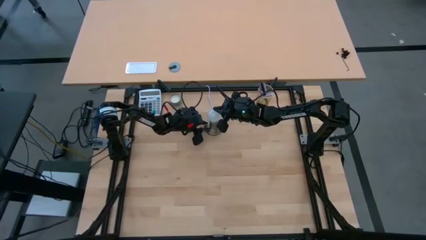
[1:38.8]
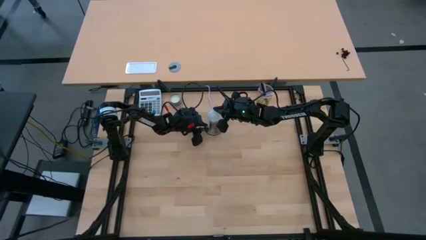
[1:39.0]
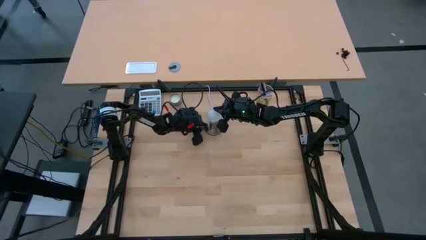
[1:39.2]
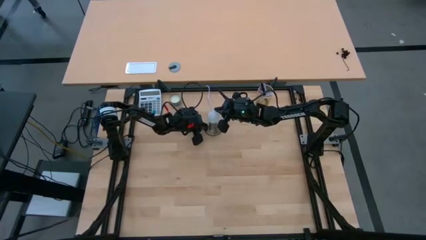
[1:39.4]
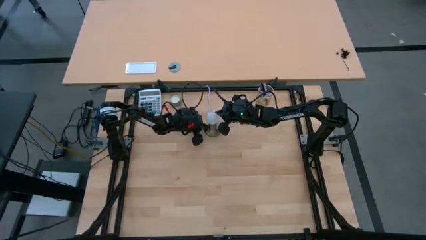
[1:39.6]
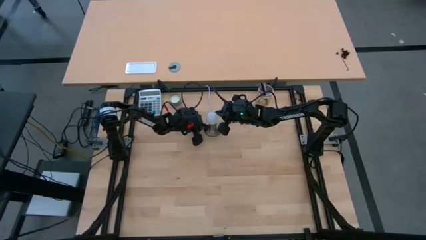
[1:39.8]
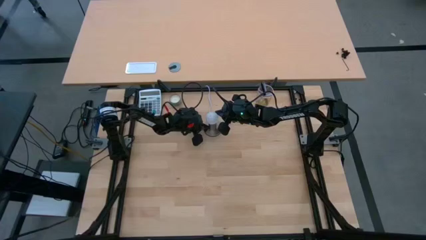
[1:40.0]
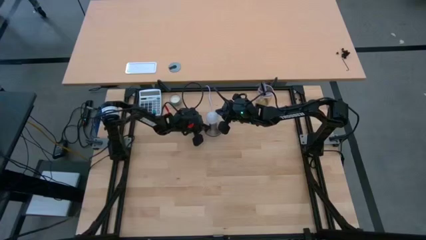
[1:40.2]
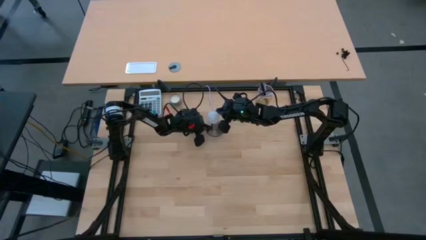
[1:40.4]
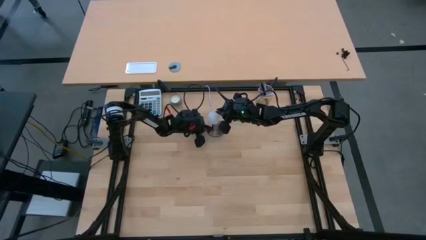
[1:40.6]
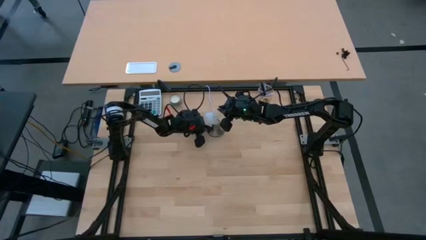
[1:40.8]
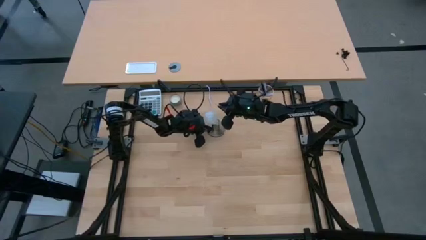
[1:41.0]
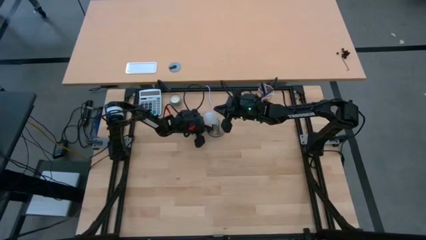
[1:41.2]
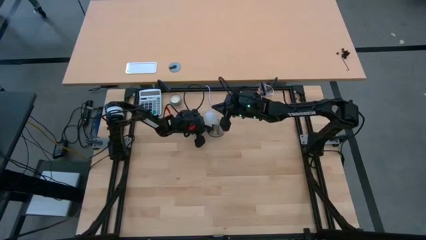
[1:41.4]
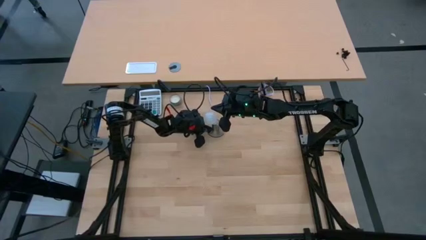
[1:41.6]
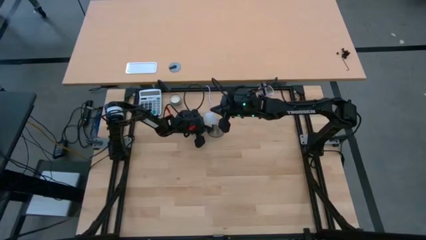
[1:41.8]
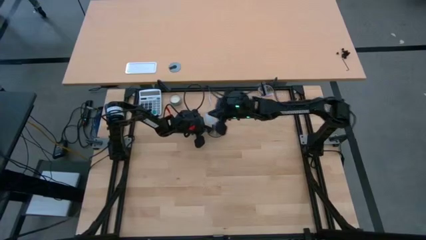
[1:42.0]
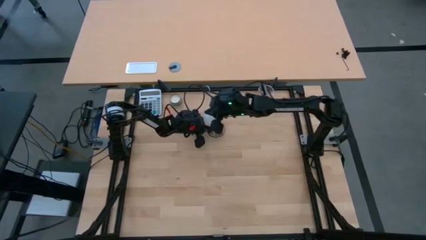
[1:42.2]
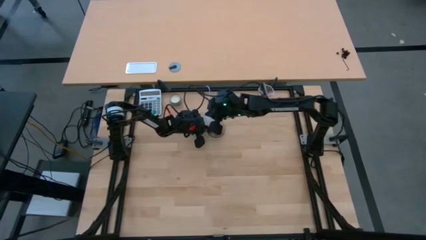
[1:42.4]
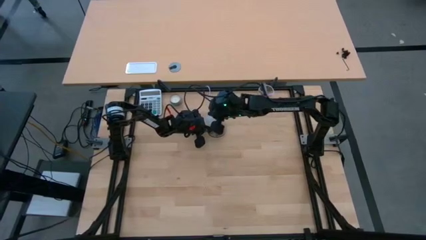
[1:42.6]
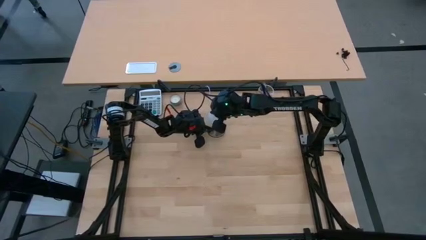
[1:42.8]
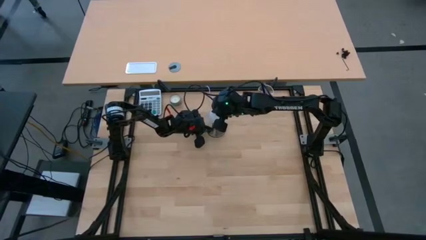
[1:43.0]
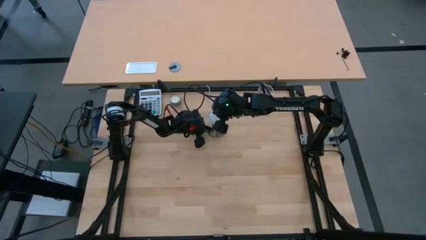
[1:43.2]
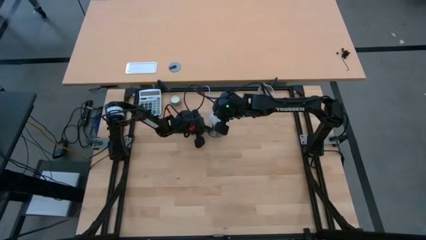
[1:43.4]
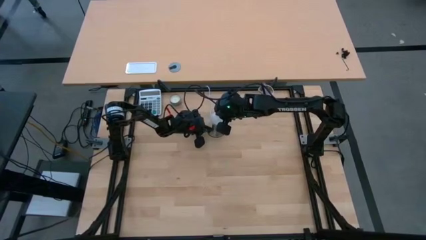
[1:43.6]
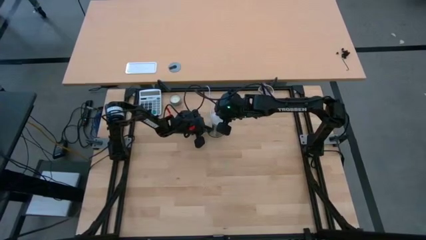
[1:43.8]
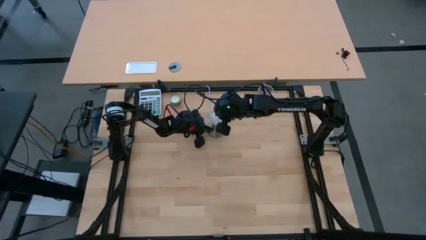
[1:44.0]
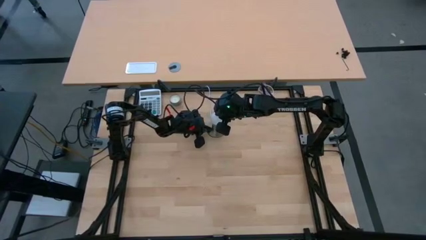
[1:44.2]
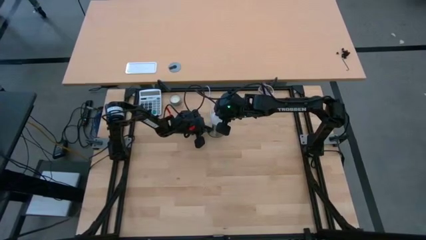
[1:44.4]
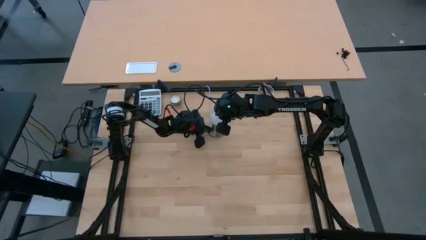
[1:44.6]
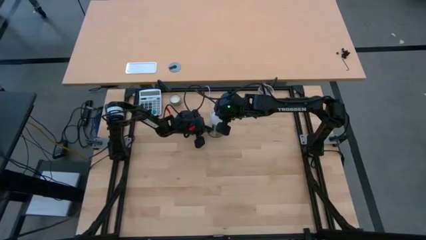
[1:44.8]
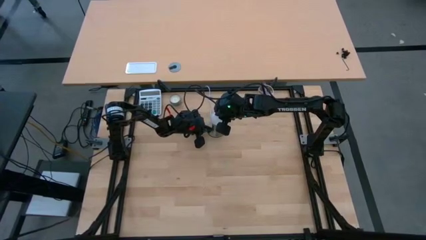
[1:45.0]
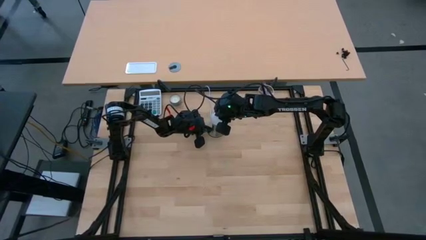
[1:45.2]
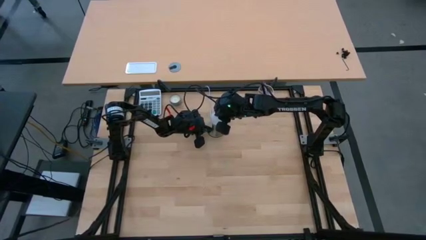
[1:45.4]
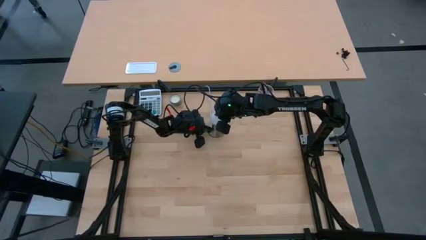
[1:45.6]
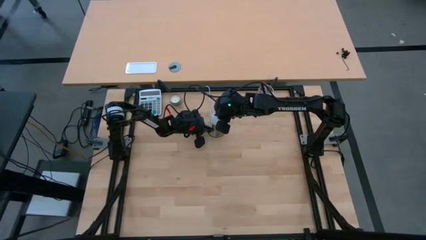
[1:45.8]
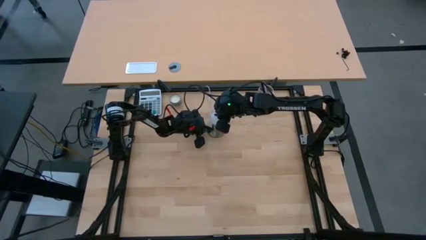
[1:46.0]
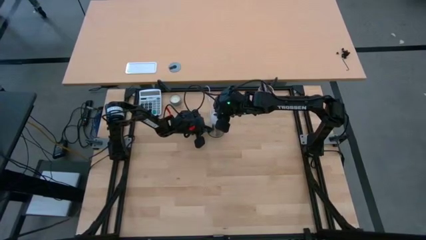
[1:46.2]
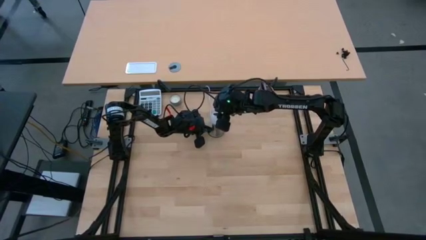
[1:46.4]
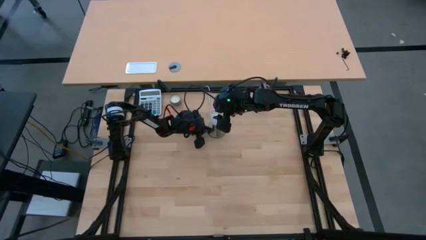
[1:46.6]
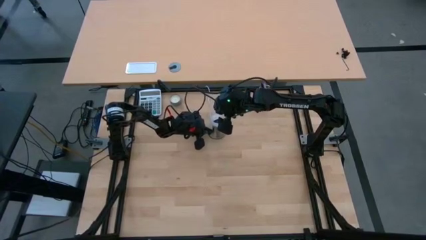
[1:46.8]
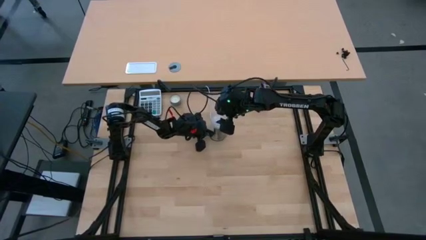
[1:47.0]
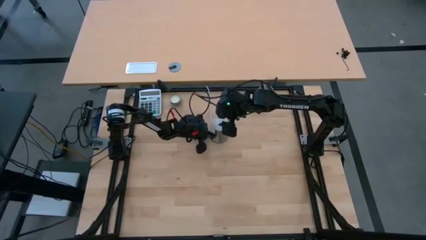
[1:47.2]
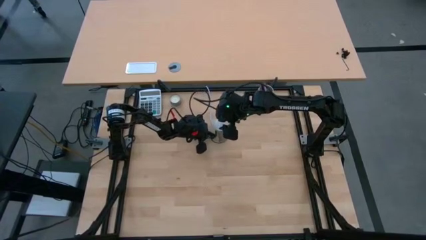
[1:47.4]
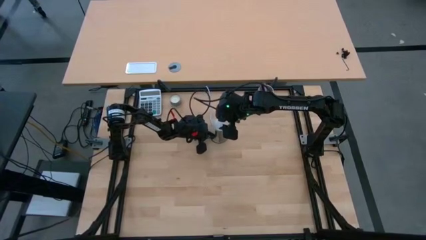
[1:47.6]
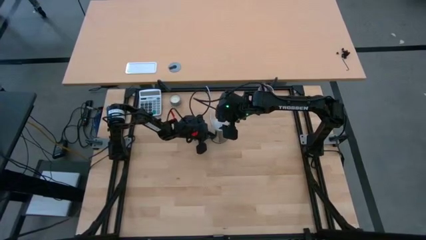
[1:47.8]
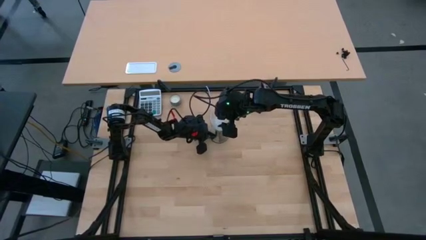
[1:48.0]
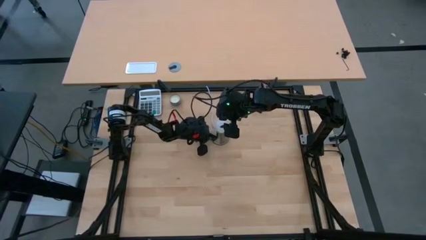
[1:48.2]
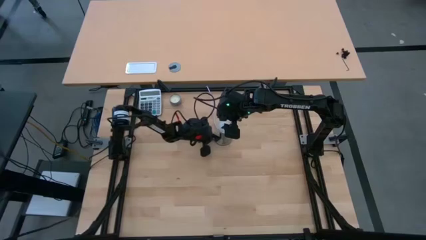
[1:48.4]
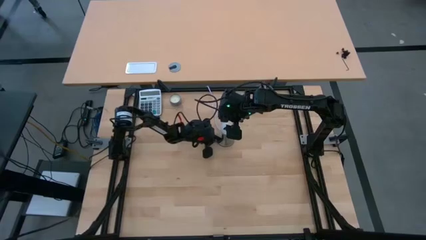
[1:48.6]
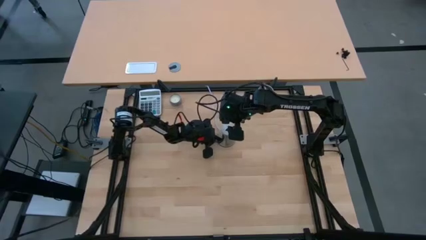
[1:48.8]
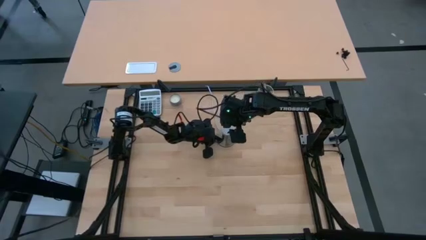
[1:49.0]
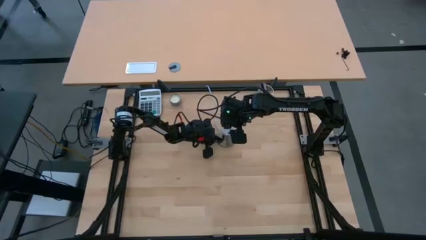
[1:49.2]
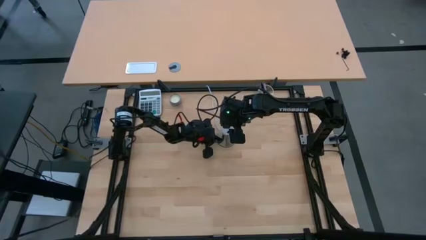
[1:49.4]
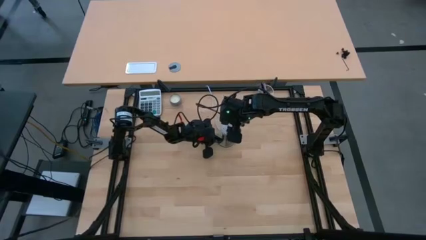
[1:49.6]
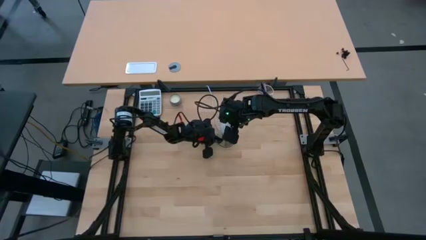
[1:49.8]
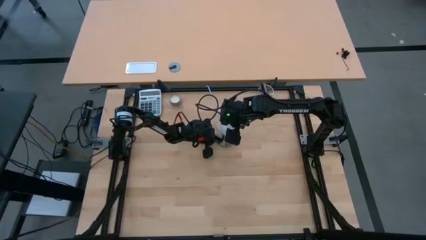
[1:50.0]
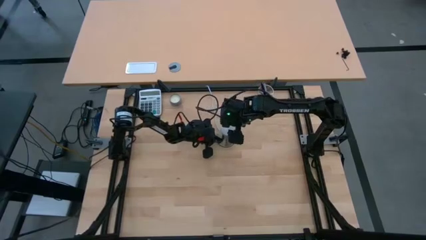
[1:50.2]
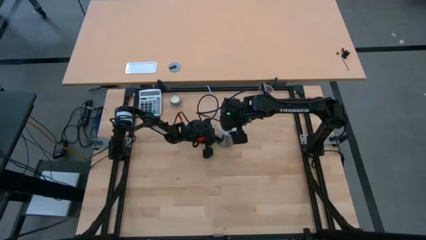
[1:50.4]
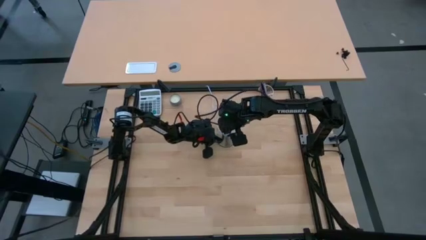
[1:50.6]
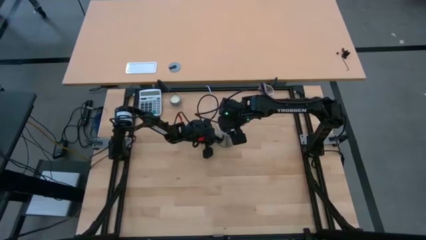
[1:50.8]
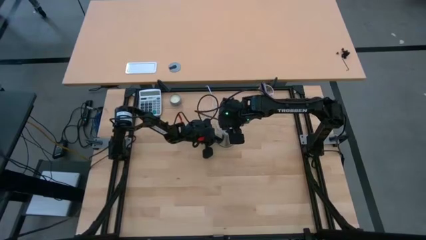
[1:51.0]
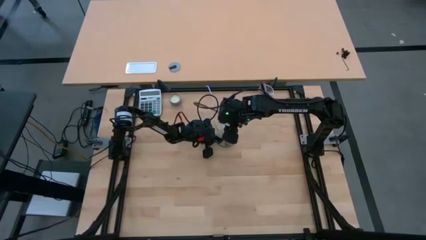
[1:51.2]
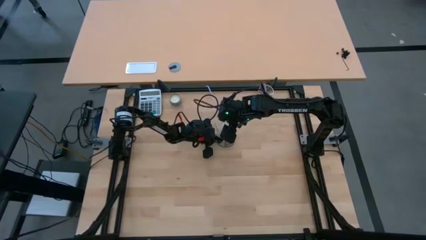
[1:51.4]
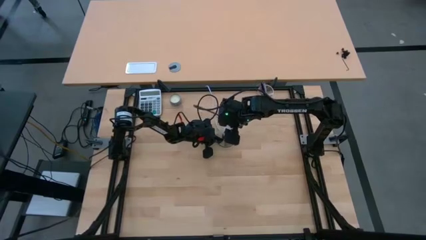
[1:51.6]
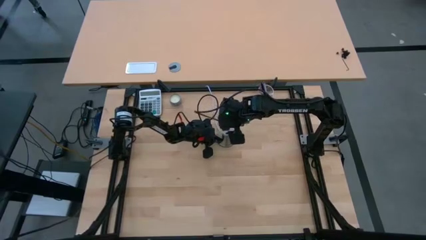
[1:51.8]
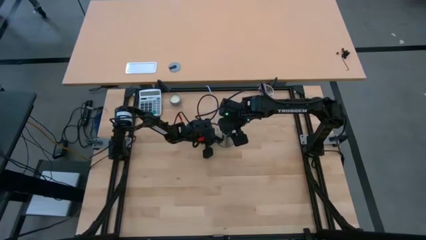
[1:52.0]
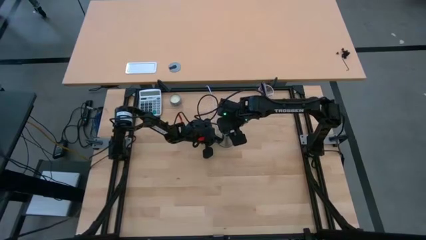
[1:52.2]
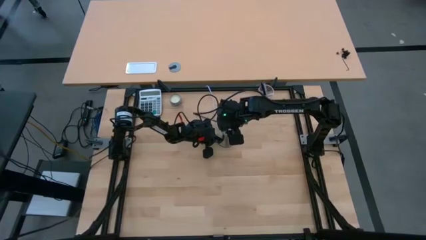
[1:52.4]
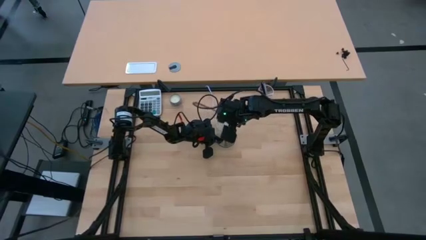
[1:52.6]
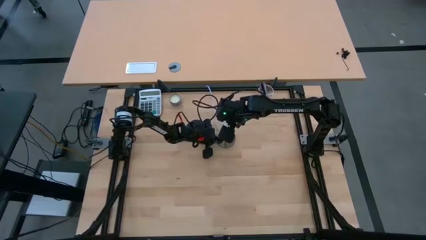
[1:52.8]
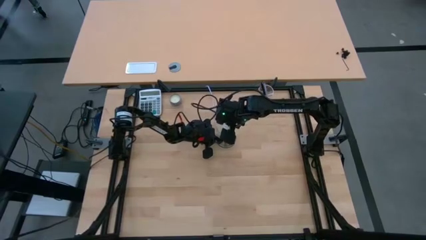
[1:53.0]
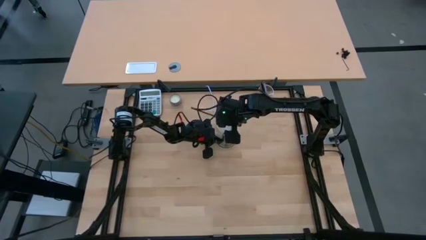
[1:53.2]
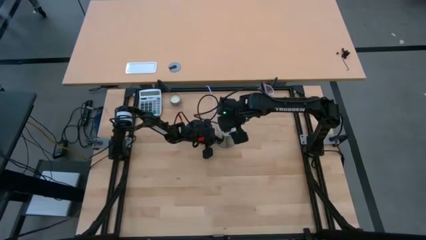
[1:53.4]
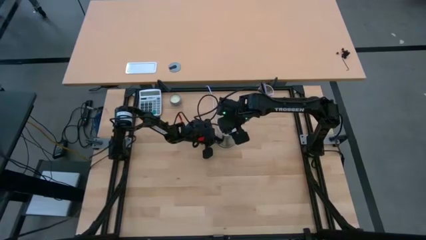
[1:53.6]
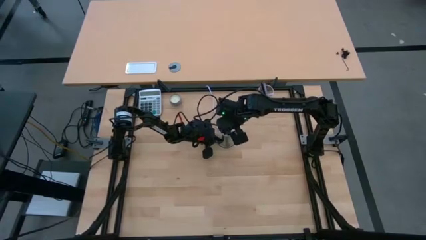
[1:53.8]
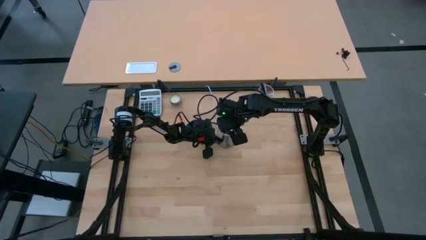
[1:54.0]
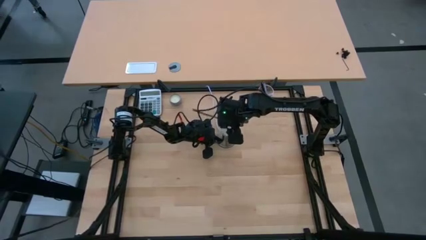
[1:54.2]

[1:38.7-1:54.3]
Task: Screw lightbulb
Insert the lightbulb into the lamp

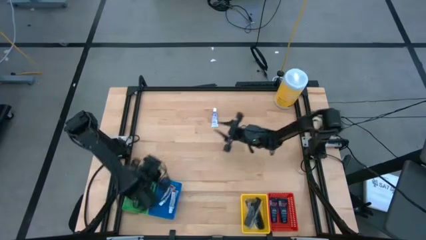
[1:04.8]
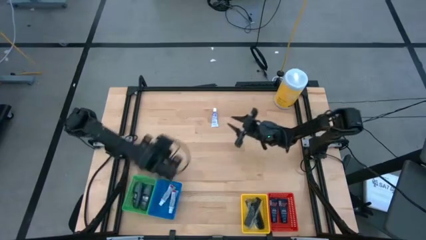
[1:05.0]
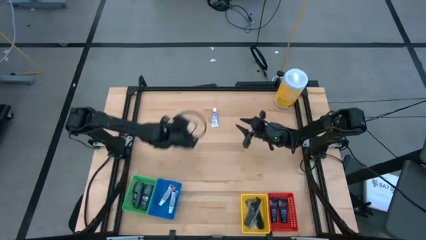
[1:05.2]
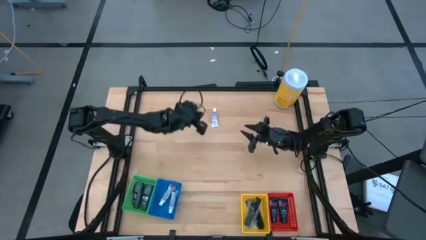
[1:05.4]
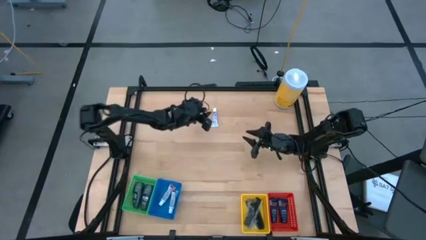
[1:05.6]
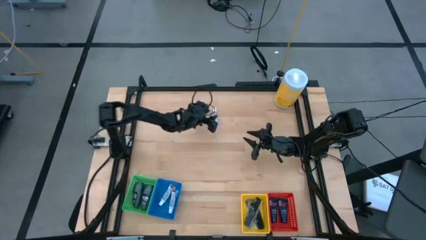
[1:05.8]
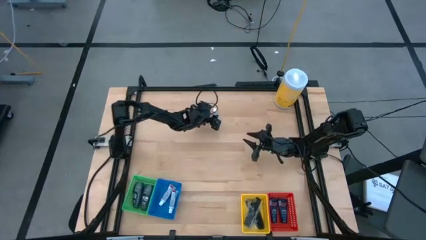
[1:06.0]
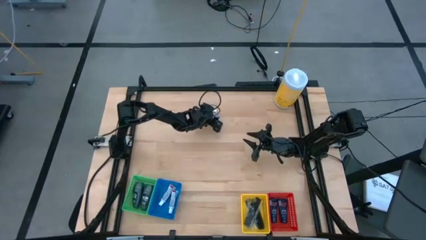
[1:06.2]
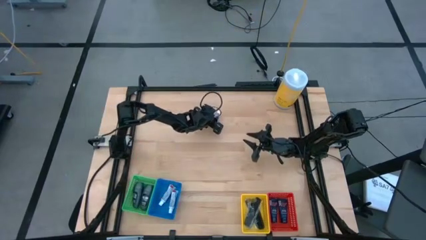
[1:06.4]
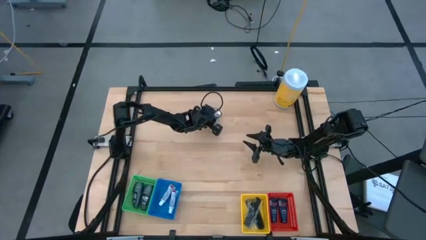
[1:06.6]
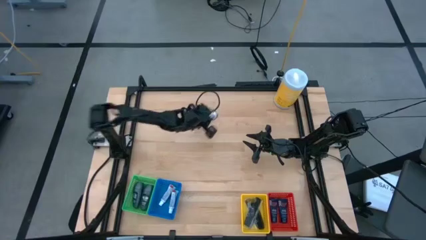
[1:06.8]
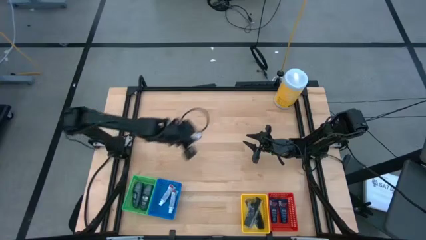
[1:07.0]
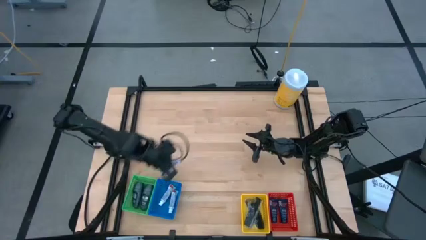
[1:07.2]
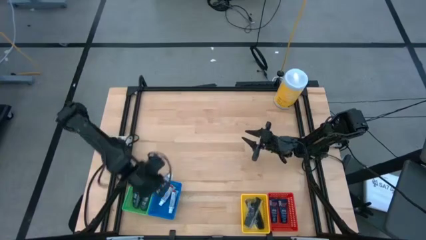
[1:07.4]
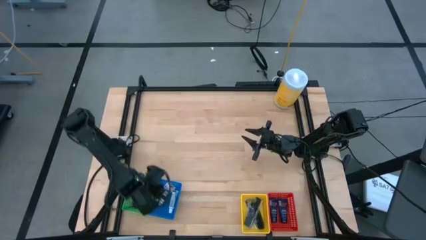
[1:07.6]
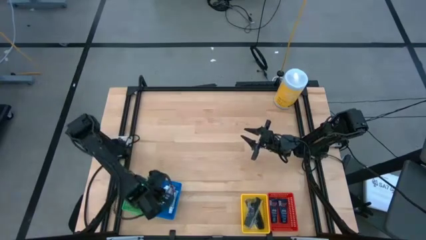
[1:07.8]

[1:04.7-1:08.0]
Task: Pick & Place Travel size toiletries
Put the white toothpaste into the blue bin
